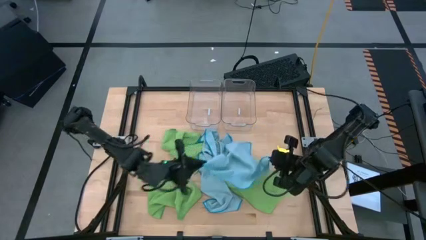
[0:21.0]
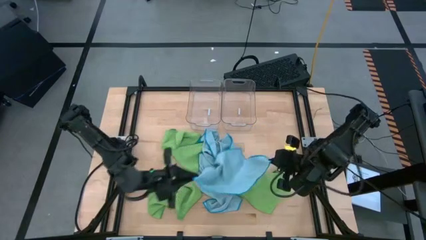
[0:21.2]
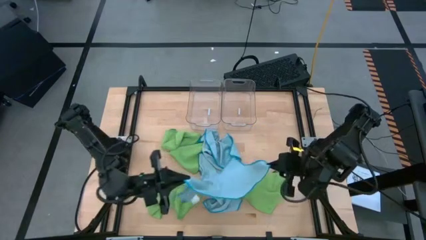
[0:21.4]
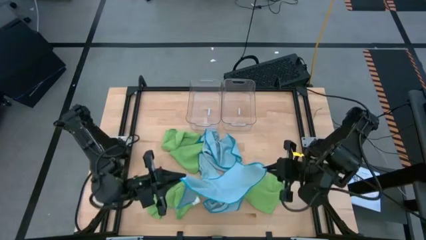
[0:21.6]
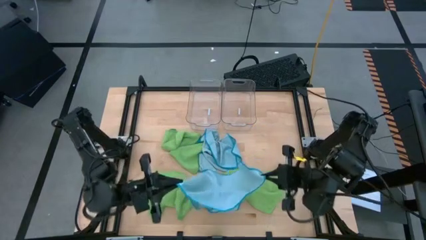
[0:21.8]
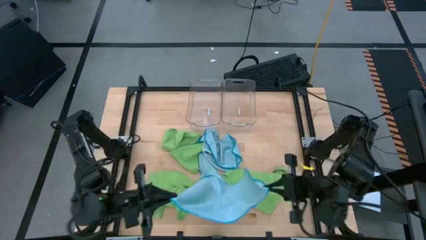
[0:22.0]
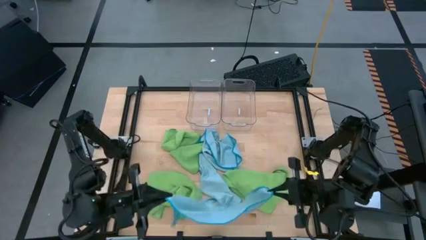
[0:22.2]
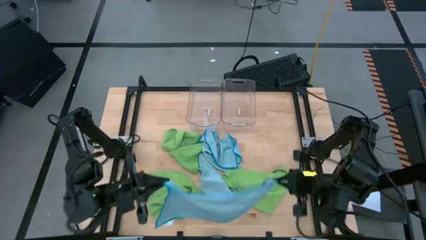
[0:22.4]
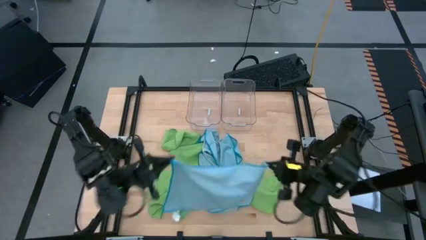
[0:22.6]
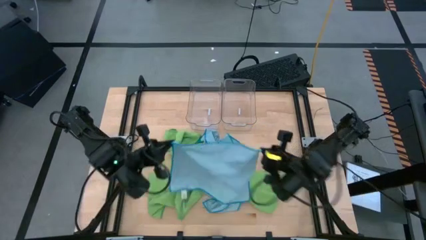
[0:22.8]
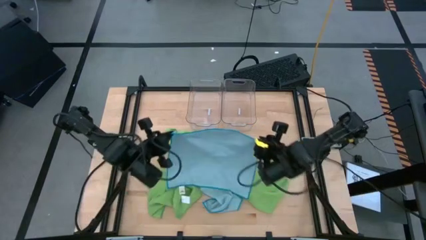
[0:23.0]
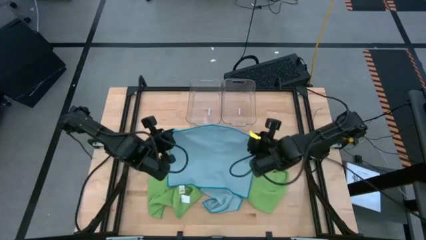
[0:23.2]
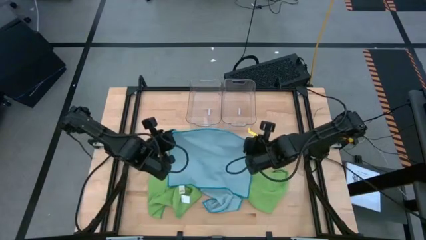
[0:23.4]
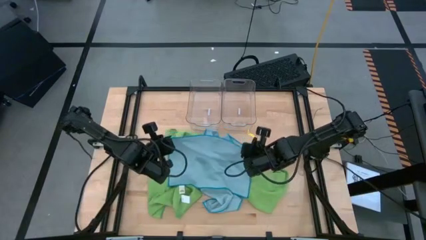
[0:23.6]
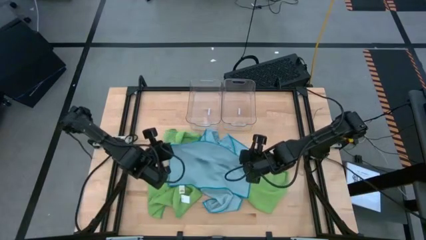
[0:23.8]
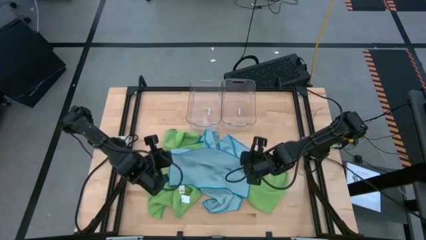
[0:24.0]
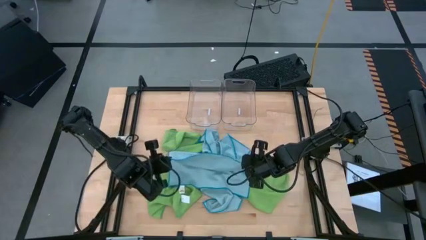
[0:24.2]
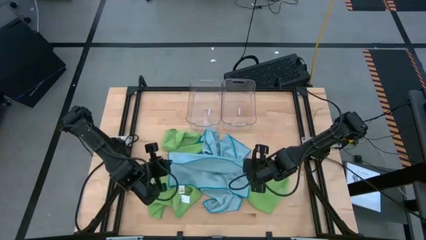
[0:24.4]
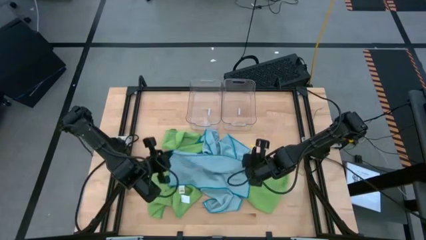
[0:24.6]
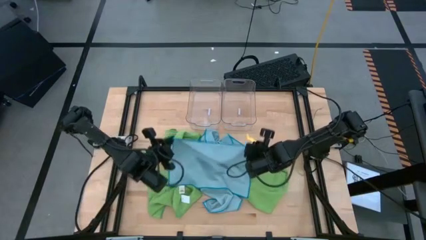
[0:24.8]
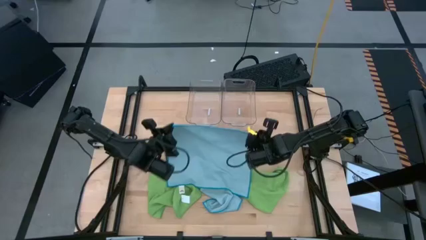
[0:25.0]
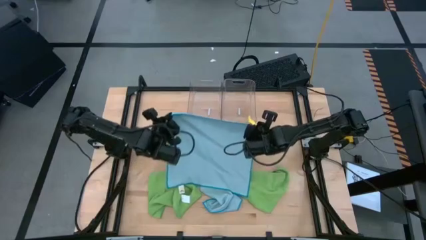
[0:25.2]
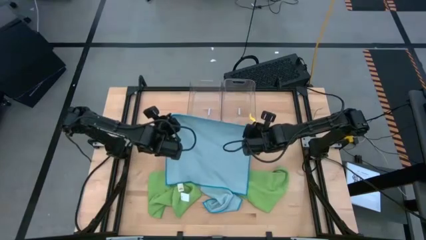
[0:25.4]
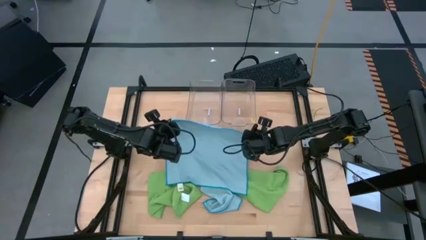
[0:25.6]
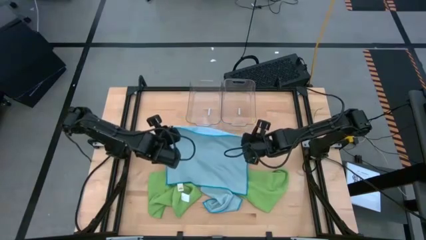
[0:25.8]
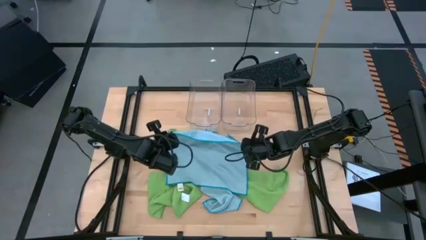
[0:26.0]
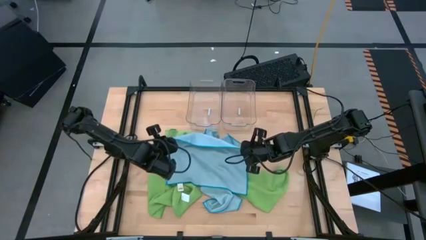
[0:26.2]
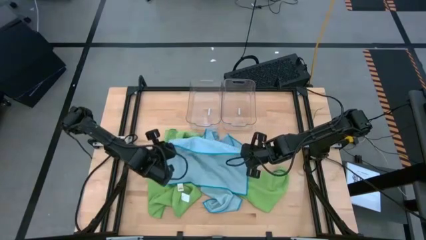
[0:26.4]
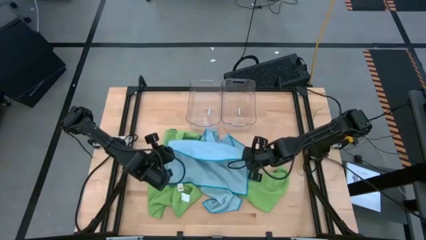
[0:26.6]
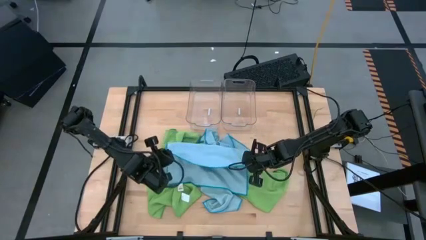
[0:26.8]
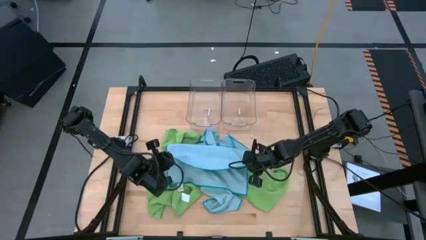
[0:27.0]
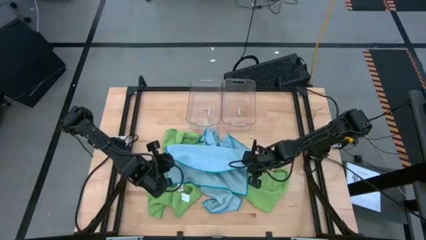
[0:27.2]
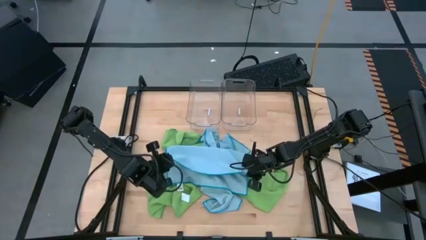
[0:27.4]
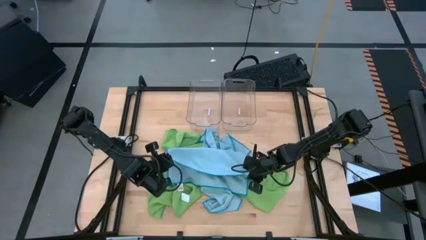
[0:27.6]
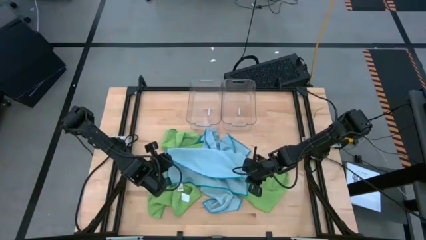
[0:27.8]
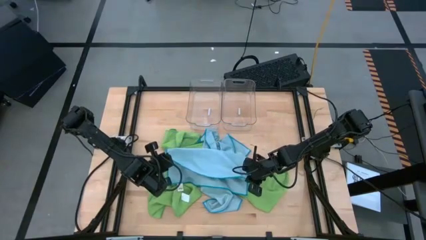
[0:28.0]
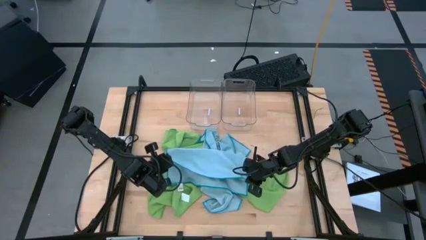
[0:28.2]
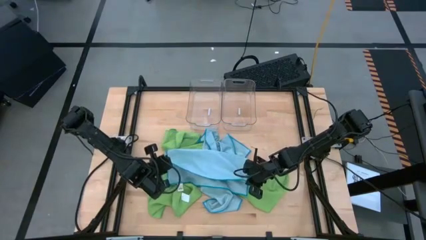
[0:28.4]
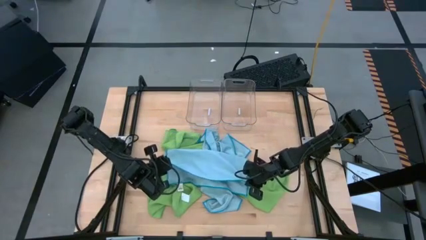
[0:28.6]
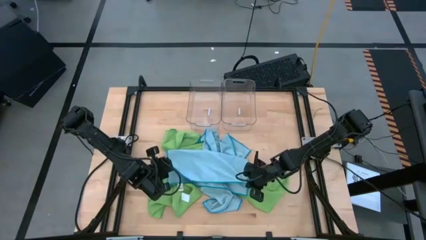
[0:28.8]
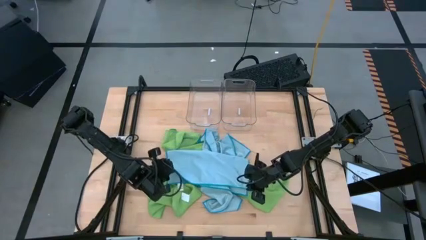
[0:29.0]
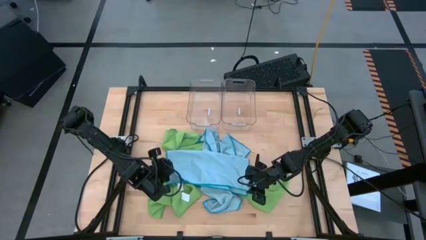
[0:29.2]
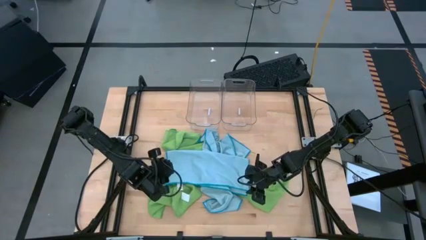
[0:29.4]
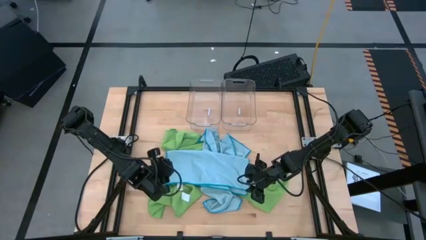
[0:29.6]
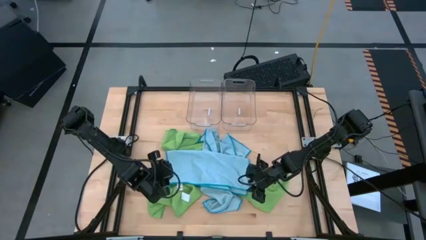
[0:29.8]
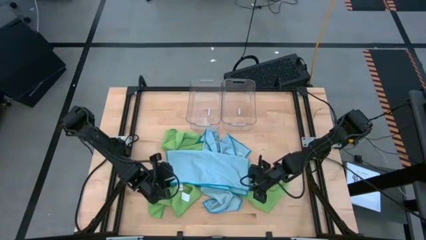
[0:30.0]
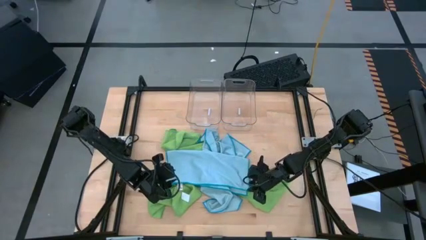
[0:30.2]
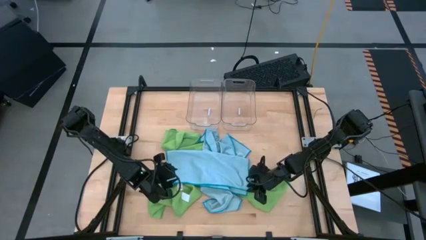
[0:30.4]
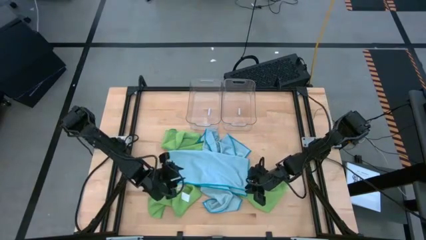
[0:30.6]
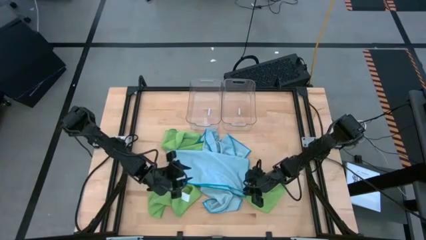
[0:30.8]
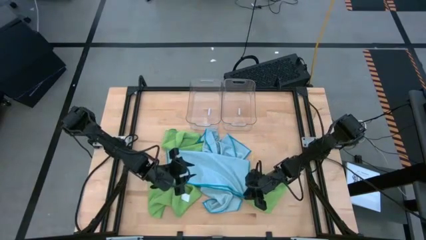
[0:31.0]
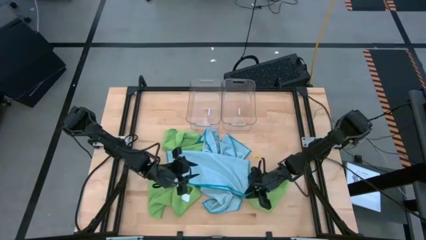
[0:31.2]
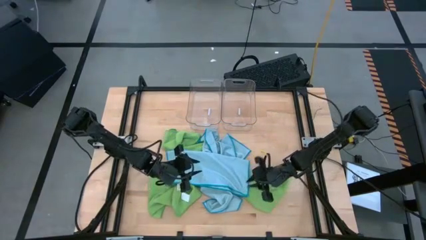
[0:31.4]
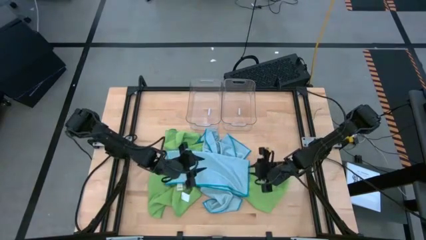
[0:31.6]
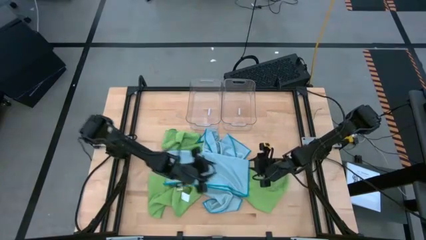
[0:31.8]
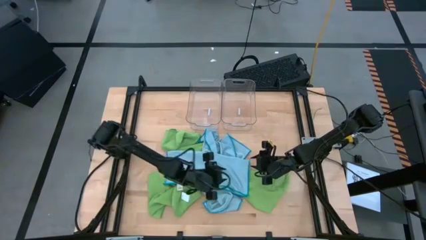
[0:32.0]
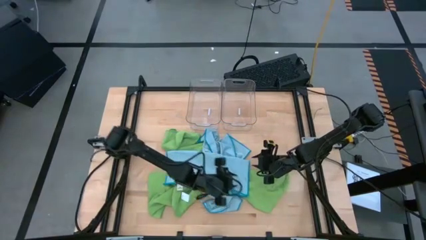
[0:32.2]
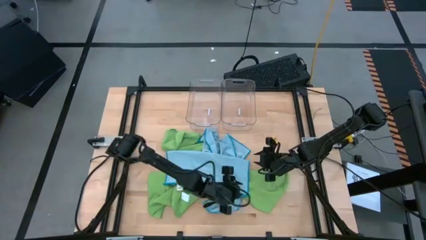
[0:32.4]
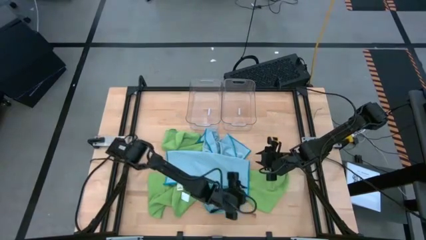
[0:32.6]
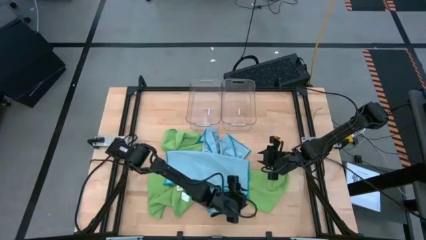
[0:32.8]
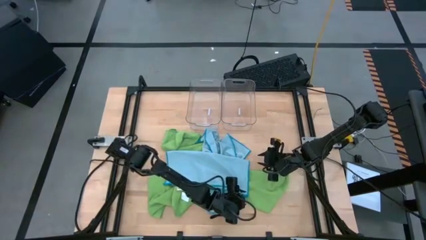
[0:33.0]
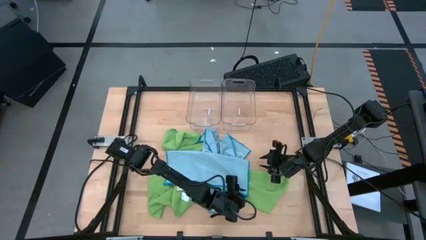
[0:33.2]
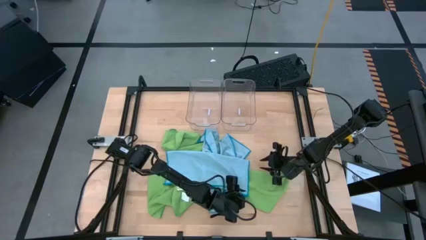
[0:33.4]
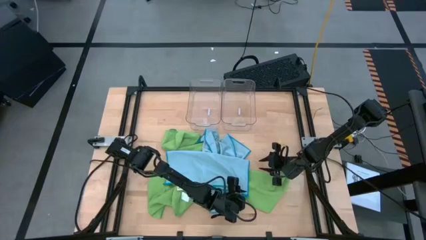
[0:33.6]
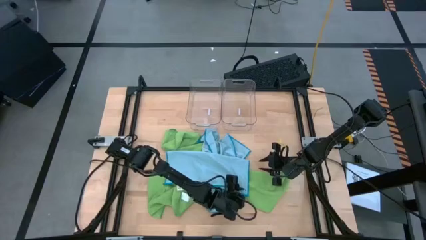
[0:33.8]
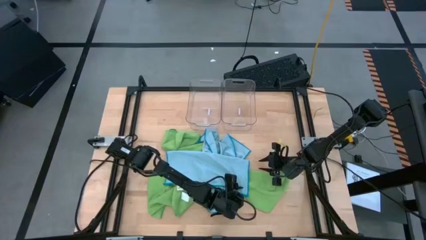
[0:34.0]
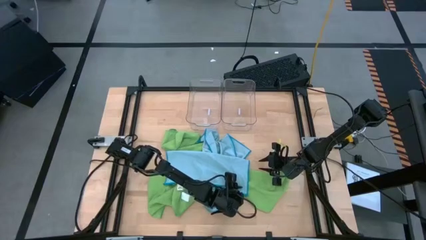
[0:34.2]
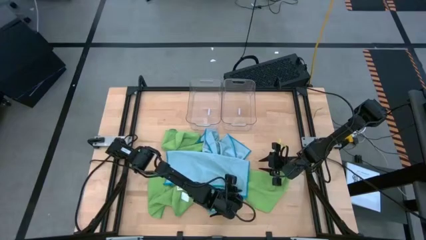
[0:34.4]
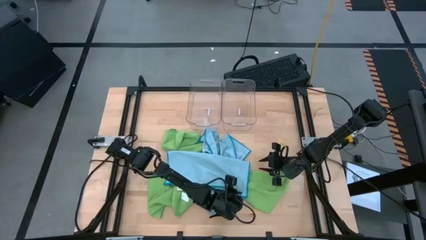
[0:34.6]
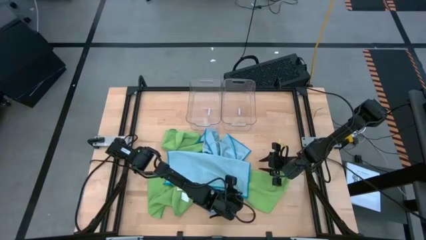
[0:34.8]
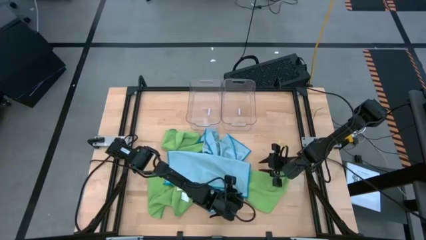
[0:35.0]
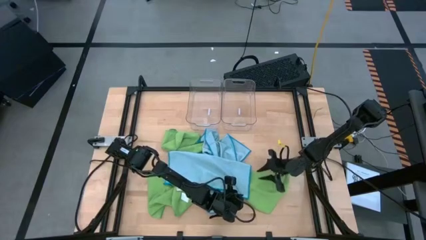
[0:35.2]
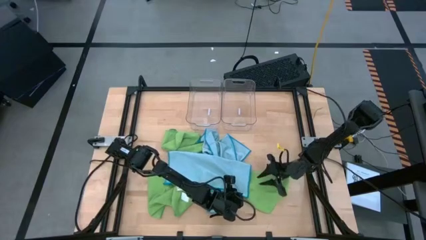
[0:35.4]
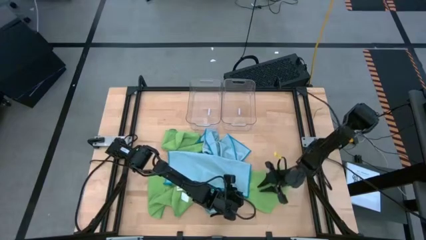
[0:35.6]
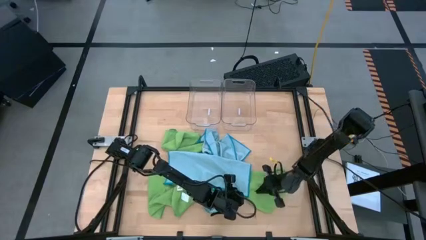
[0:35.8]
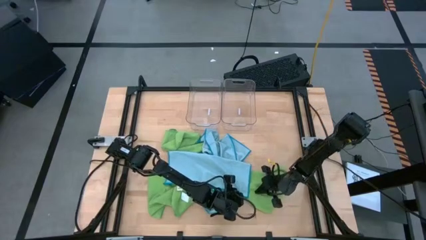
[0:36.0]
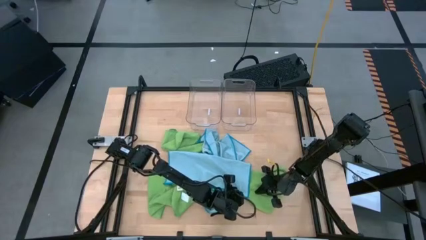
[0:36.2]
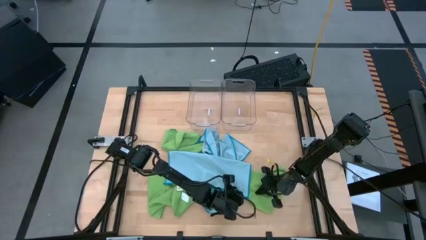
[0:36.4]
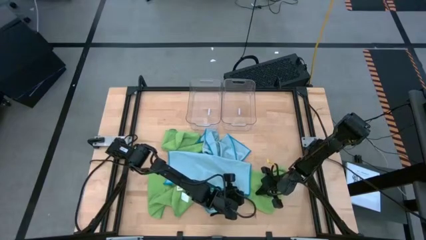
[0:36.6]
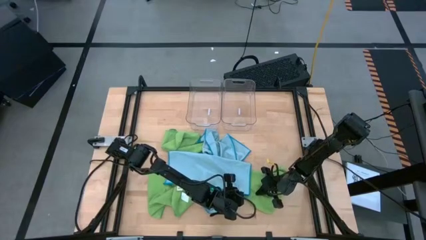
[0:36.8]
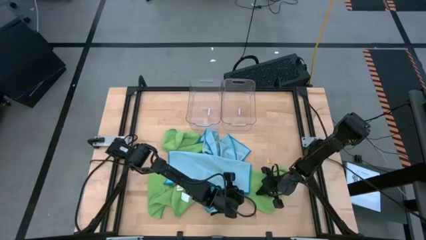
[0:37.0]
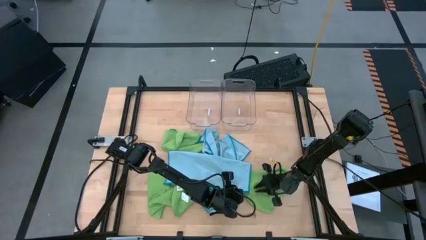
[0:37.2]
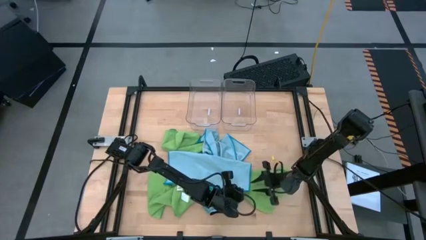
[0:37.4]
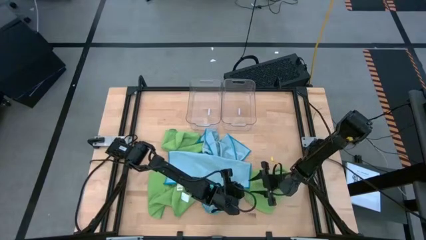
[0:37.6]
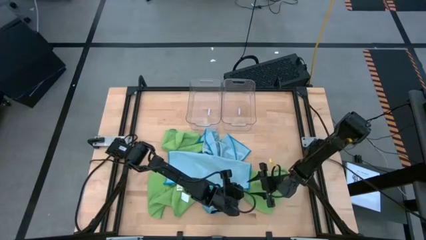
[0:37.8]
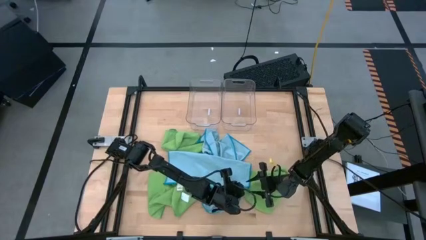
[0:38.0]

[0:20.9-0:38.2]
Task: Fold microfiber towels
Fold the top right blue microfiber towel
